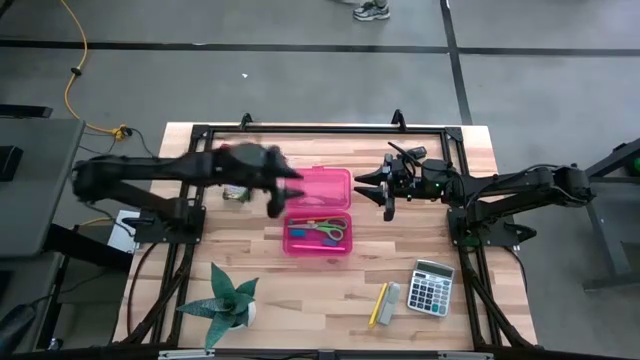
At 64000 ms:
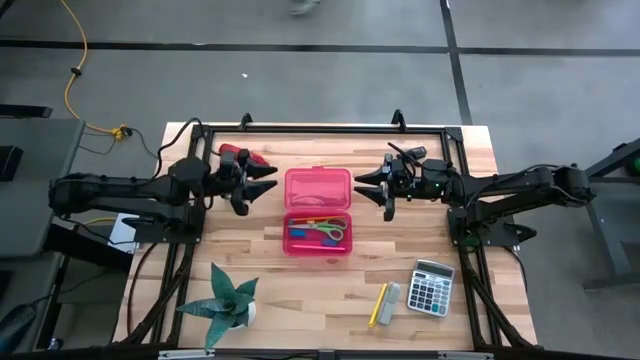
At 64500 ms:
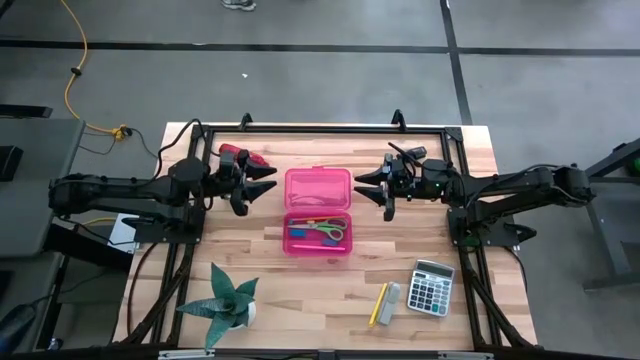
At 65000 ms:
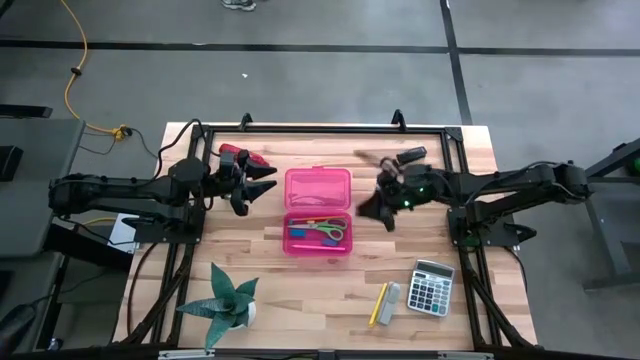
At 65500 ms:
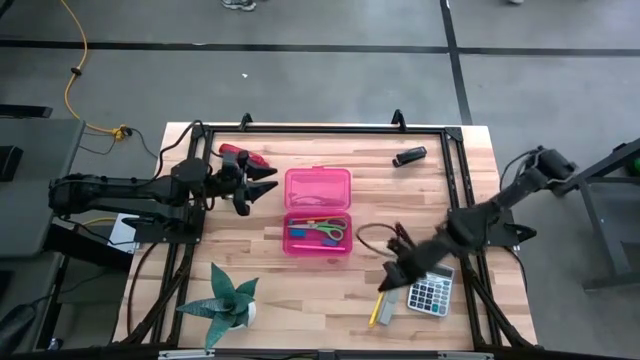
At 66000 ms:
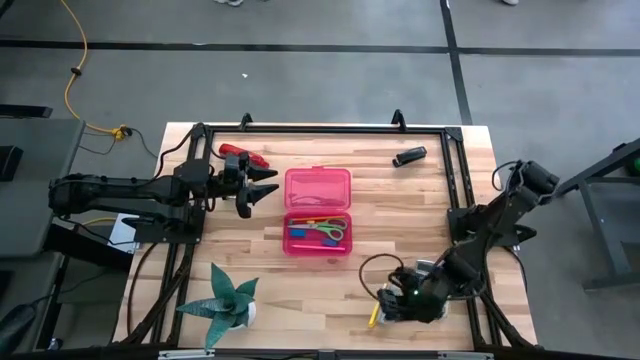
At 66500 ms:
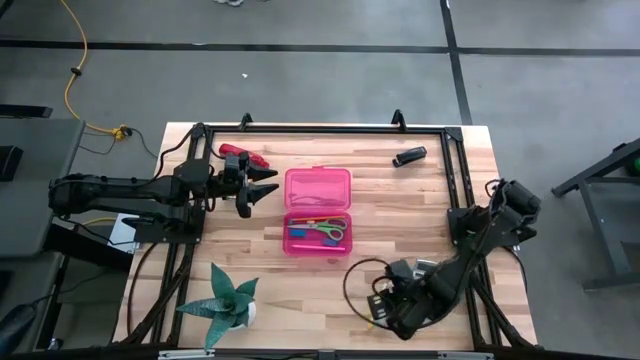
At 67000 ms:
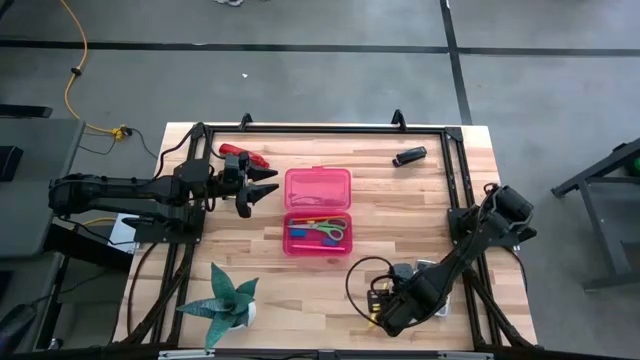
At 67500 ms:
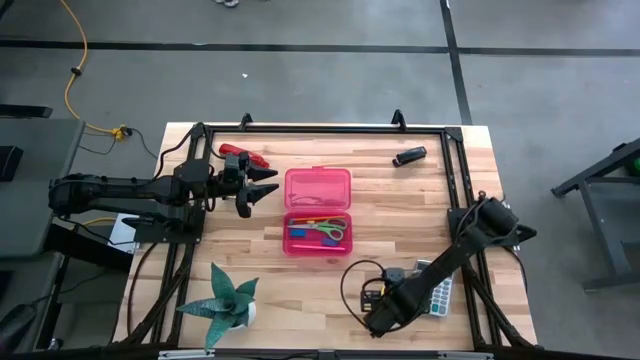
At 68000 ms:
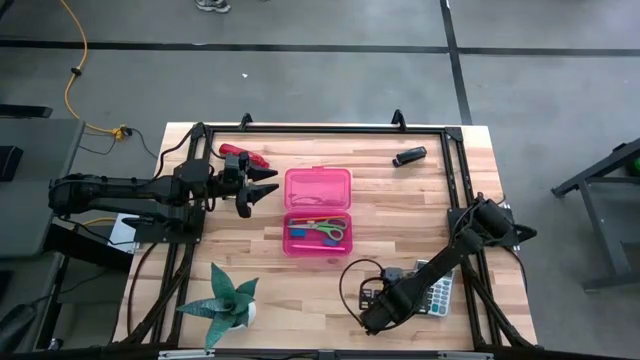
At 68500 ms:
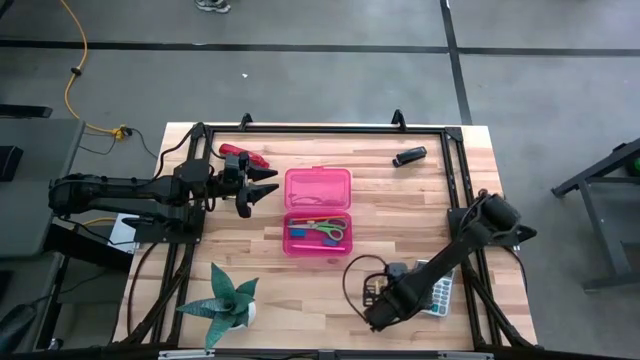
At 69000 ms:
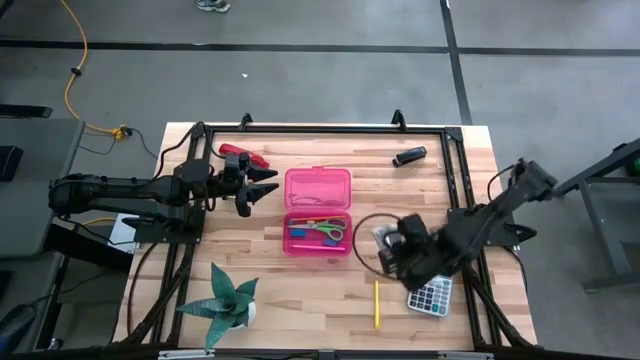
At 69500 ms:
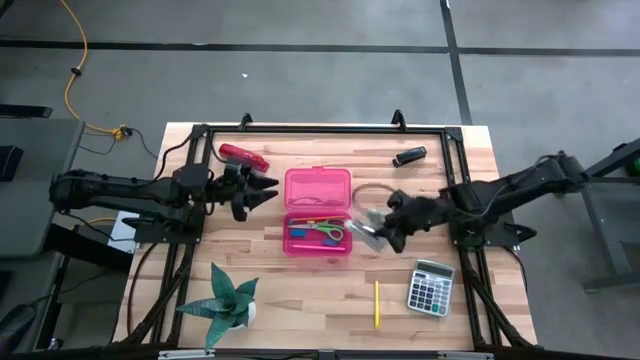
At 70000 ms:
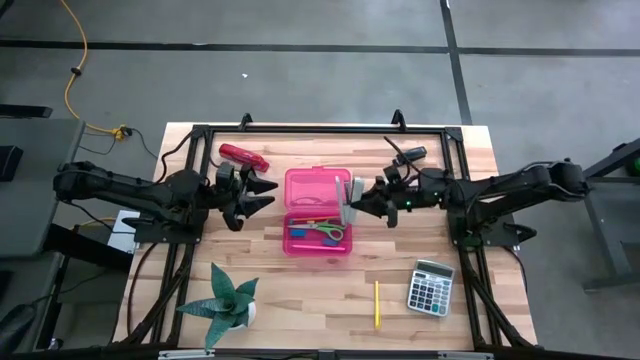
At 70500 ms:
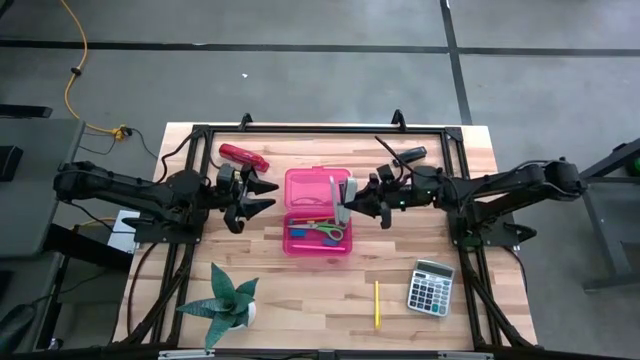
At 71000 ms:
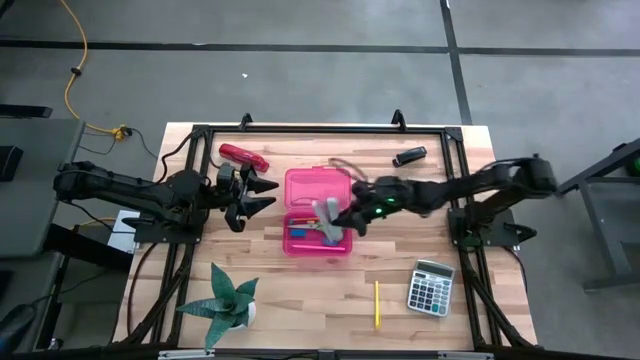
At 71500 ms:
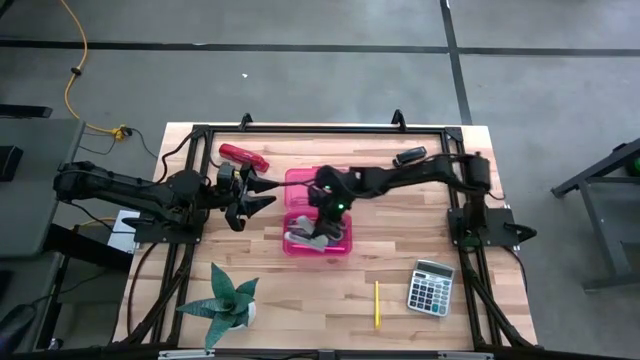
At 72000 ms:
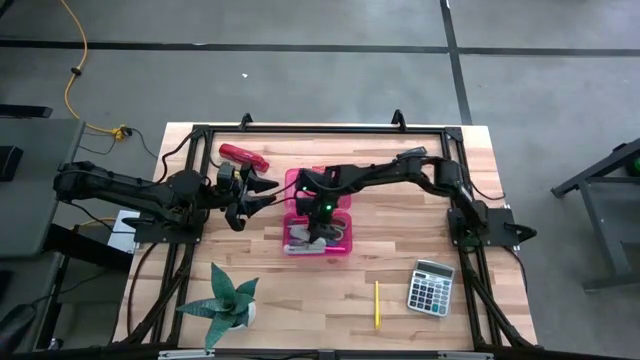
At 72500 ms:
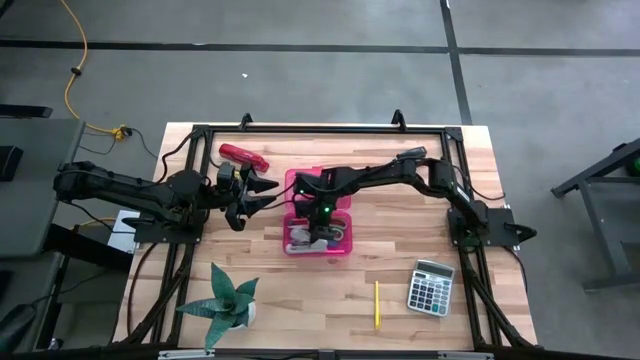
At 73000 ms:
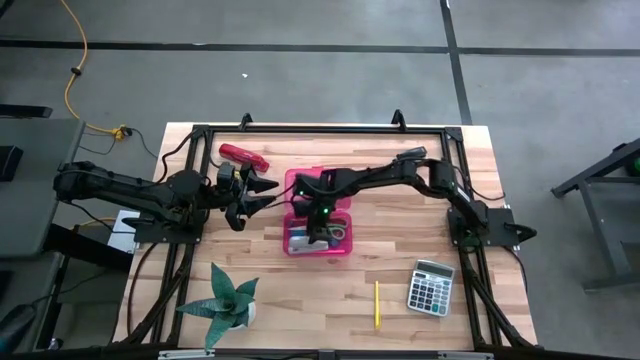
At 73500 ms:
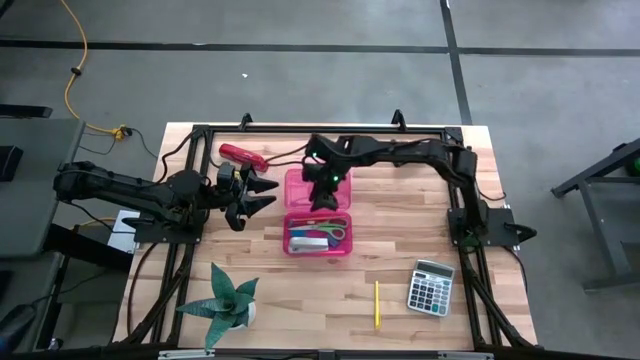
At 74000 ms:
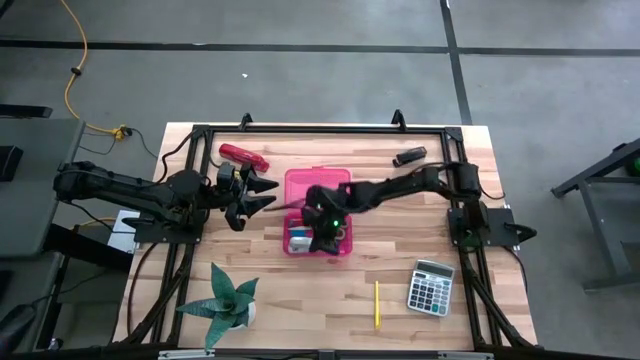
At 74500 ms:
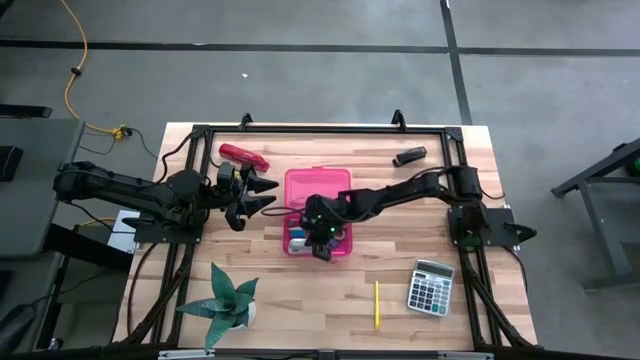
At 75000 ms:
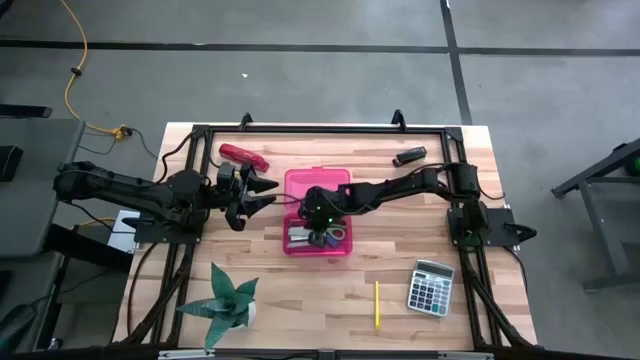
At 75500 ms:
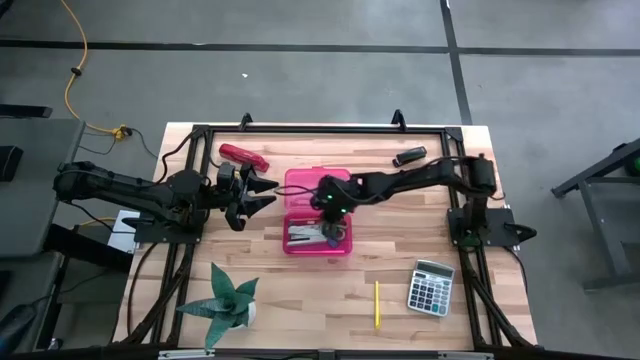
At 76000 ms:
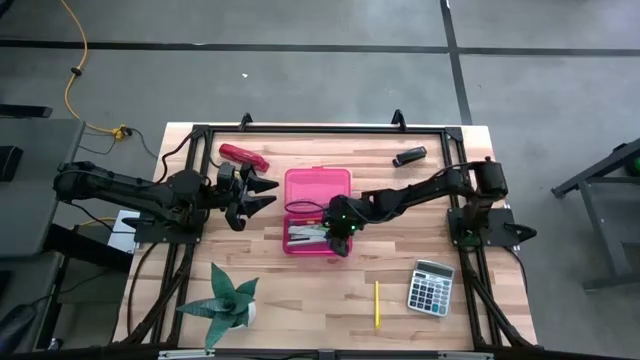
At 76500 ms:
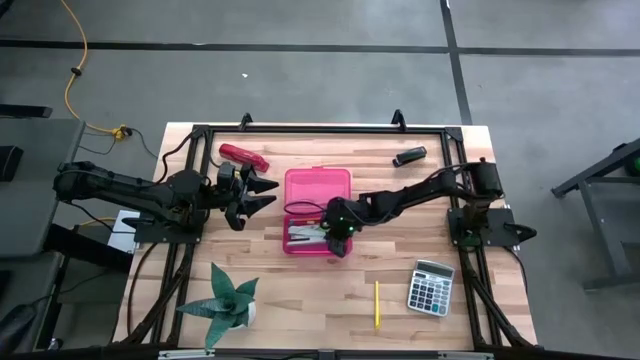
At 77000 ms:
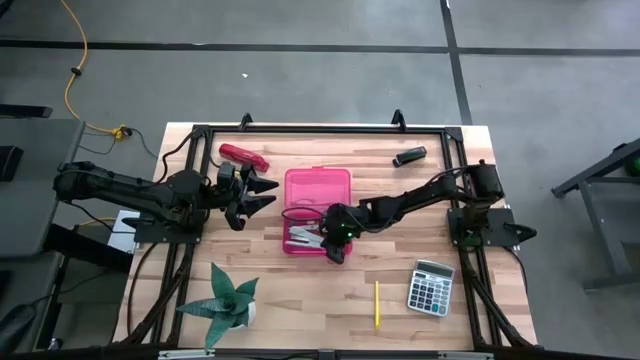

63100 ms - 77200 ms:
Task: Pack school essentials
Put the gray stapler into the pink supply box

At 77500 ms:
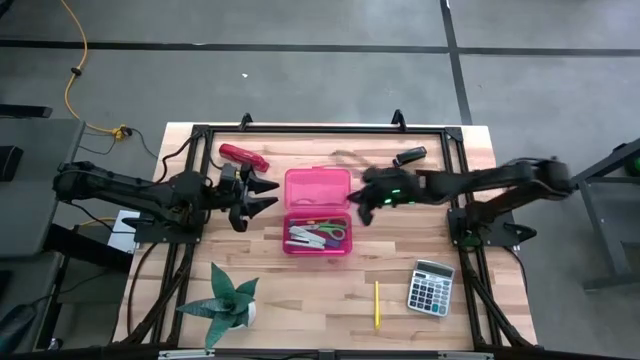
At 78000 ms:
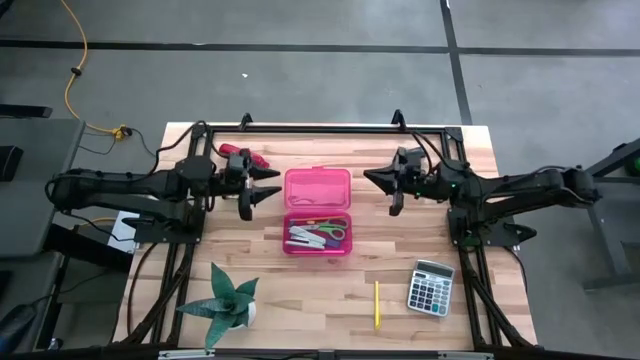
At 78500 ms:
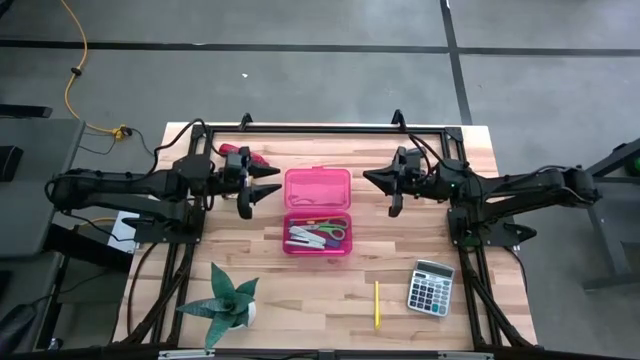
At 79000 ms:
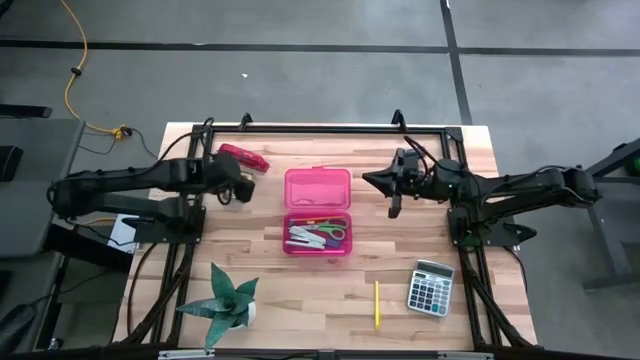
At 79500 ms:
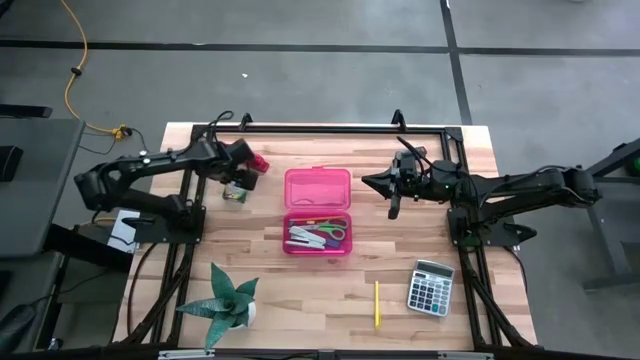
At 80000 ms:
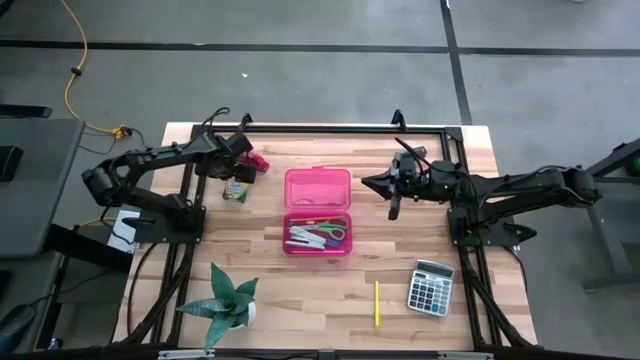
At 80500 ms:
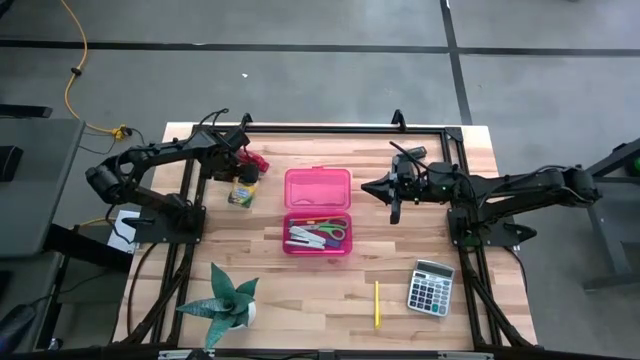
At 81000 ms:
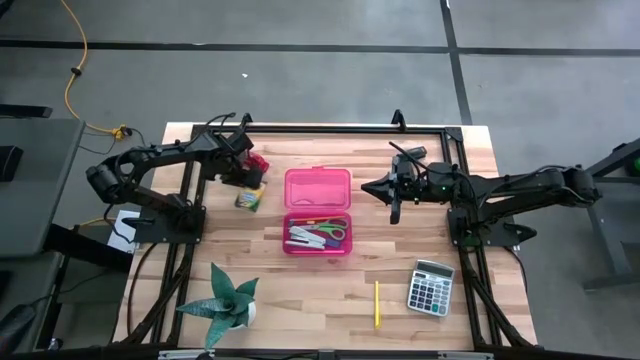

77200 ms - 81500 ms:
Put the yellow crayon box into the pink supply box

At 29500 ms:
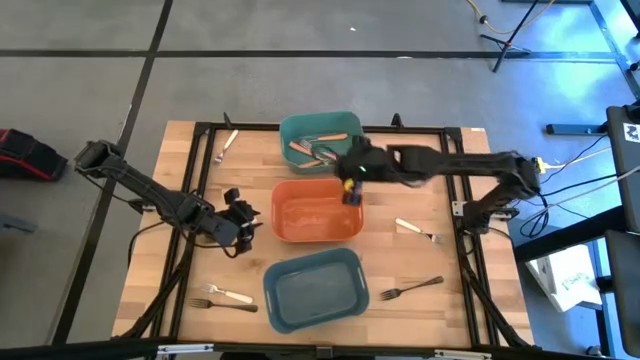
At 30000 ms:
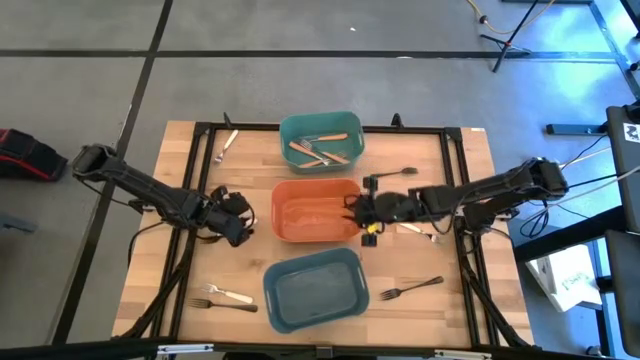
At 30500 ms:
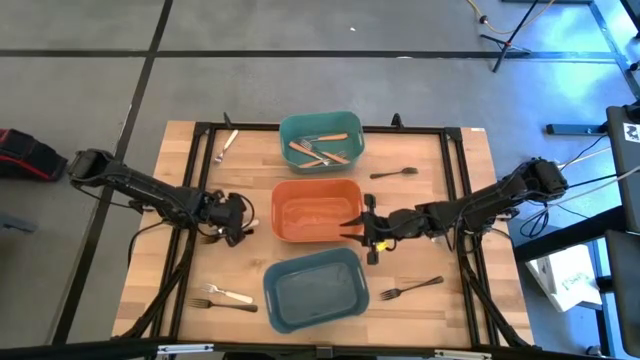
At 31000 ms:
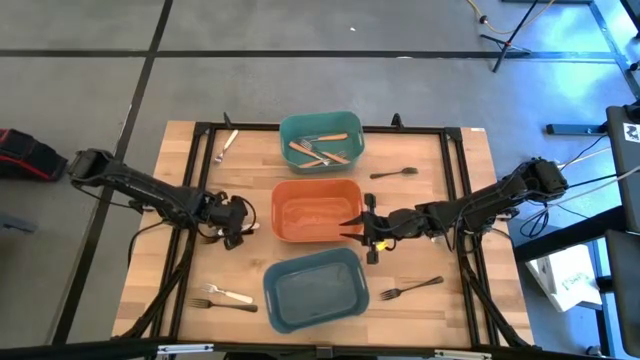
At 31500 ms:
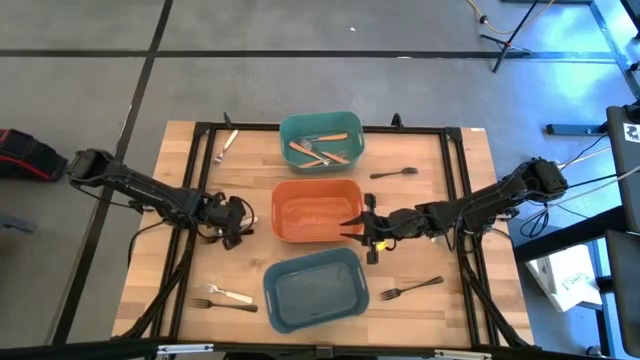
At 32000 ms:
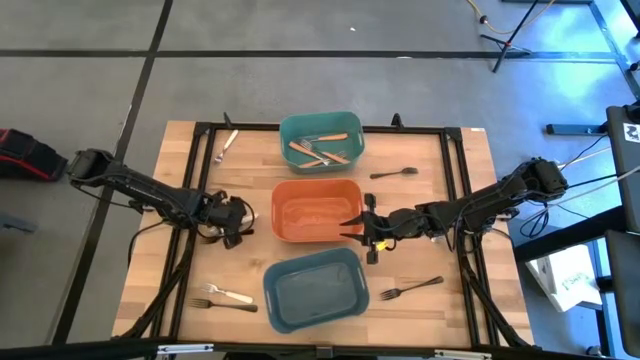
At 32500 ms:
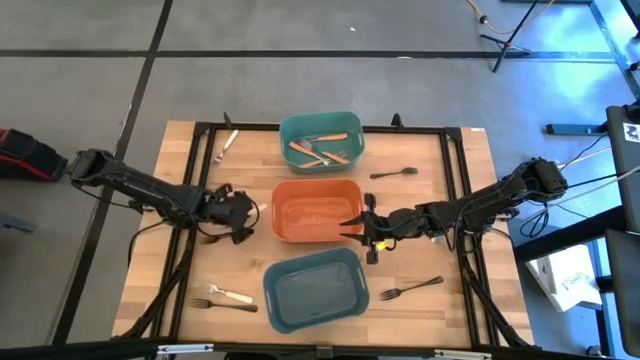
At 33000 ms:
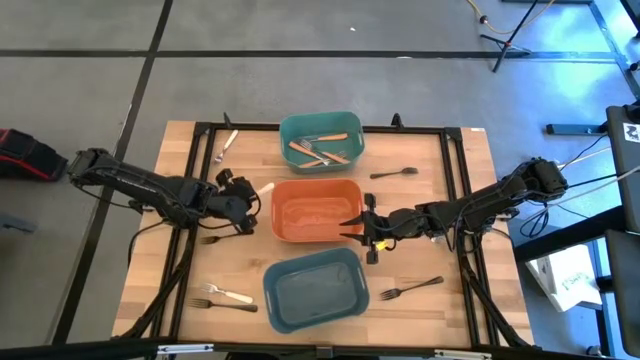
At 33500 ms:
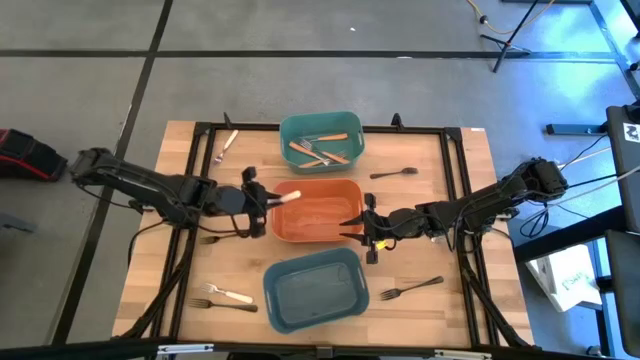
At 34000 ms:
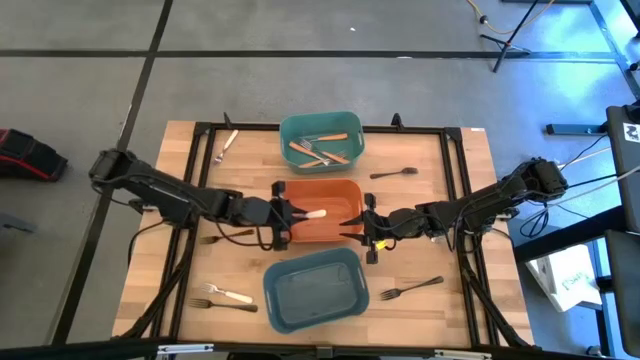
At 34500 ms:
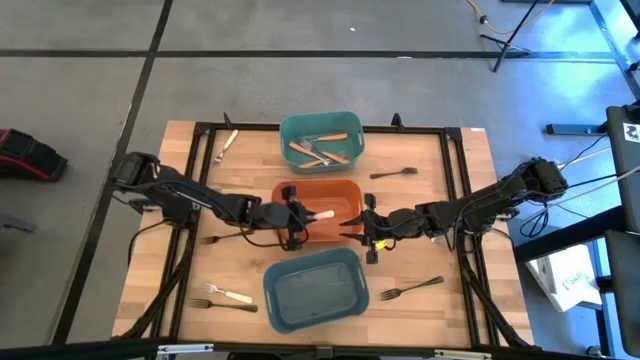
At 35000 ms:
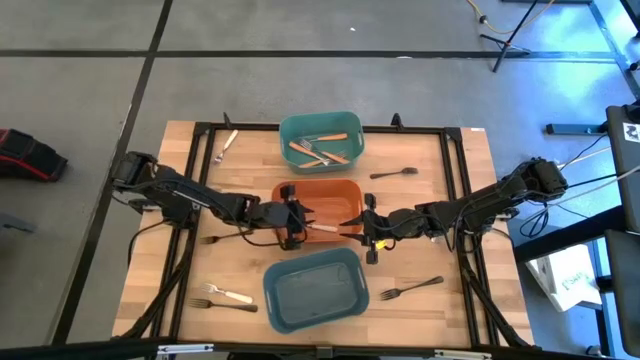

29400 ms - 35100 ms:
Task: Sort silverware by color (type)
Put the white fork into the orange bin
